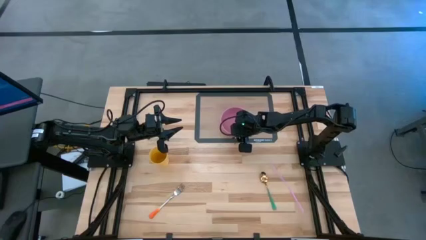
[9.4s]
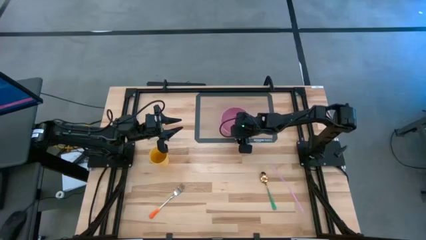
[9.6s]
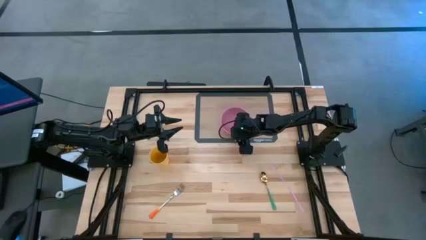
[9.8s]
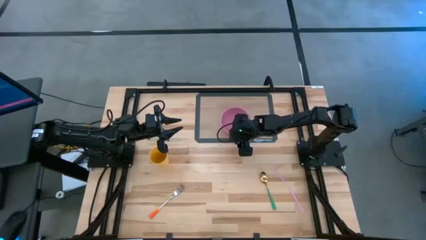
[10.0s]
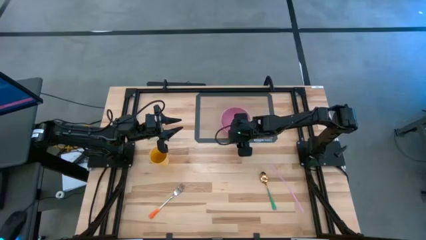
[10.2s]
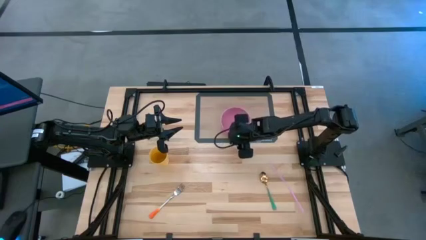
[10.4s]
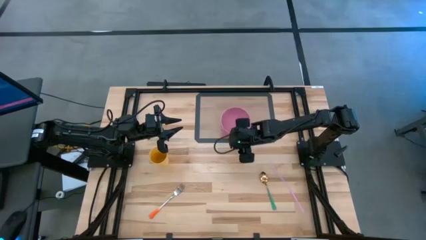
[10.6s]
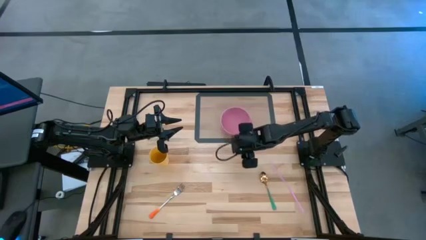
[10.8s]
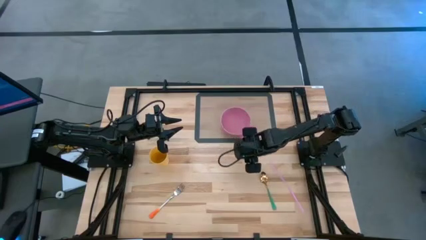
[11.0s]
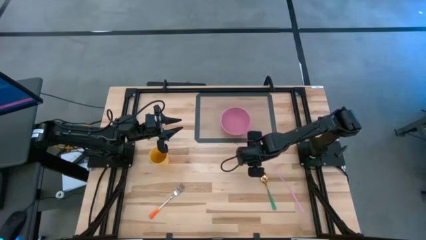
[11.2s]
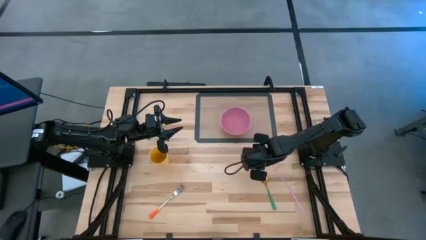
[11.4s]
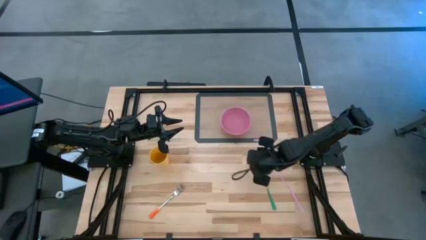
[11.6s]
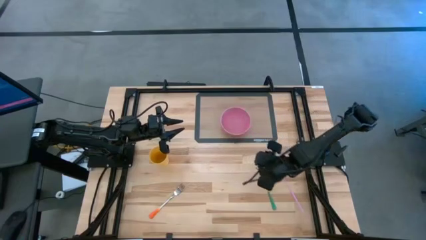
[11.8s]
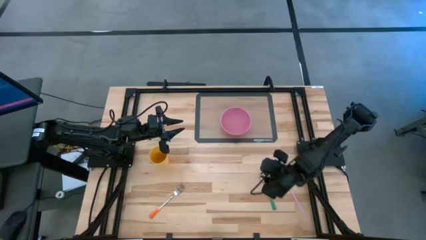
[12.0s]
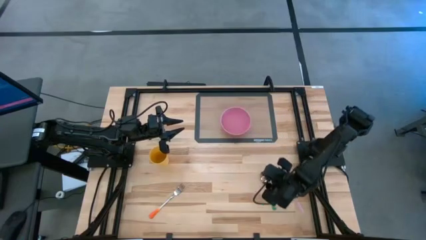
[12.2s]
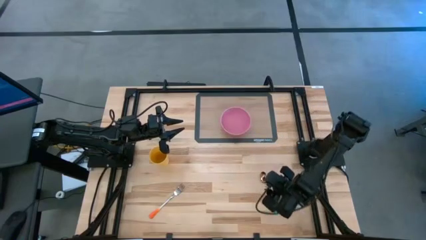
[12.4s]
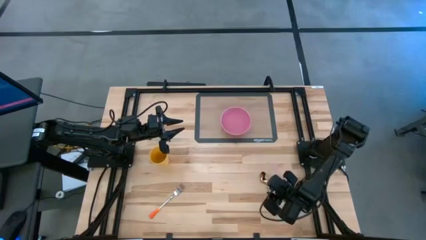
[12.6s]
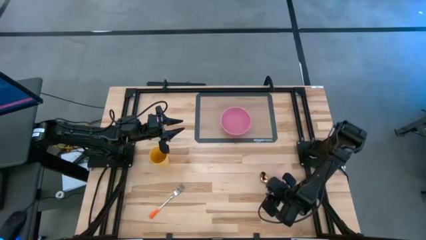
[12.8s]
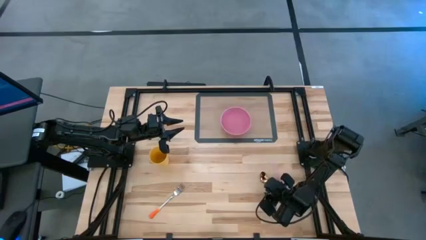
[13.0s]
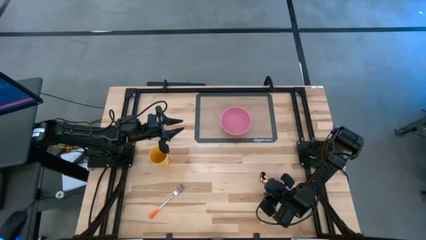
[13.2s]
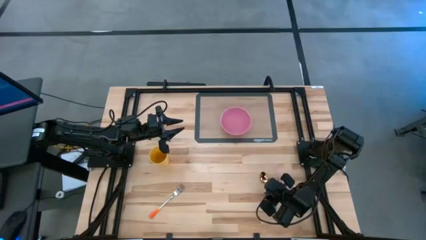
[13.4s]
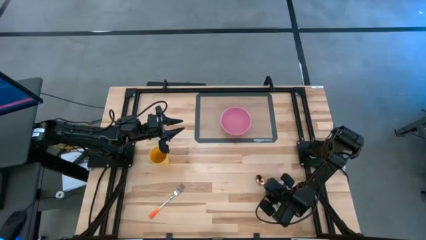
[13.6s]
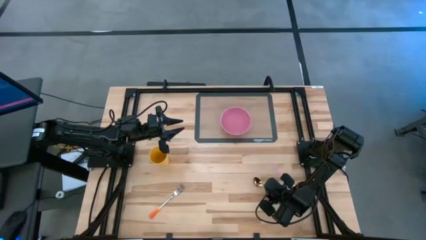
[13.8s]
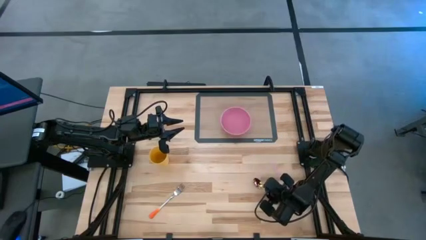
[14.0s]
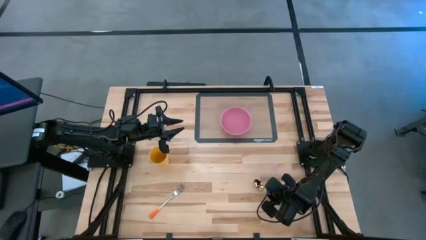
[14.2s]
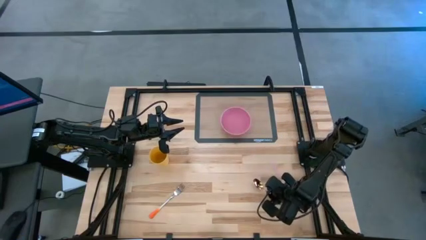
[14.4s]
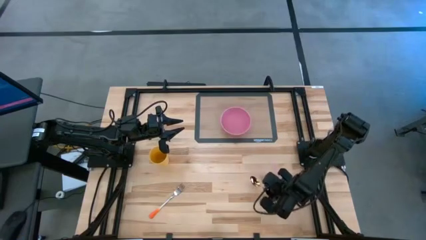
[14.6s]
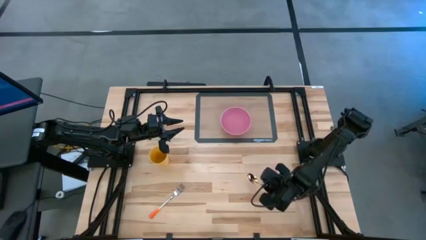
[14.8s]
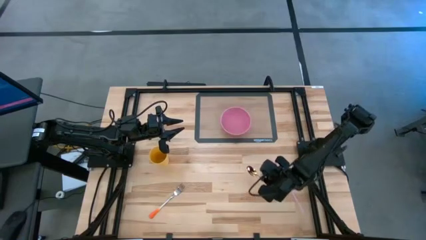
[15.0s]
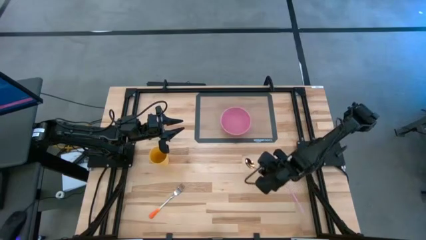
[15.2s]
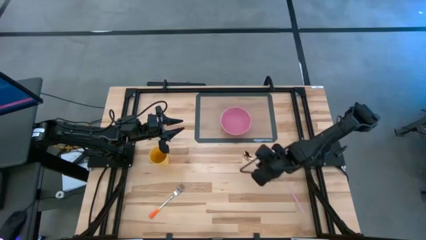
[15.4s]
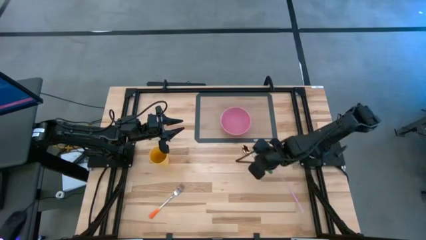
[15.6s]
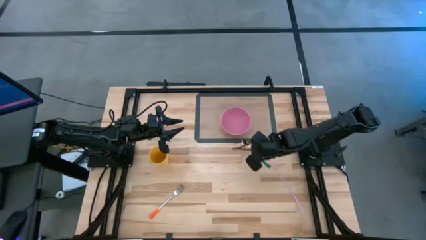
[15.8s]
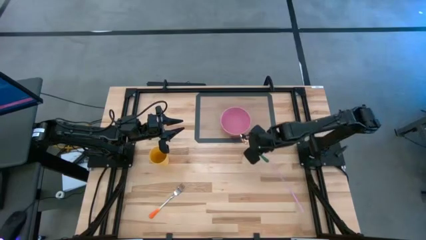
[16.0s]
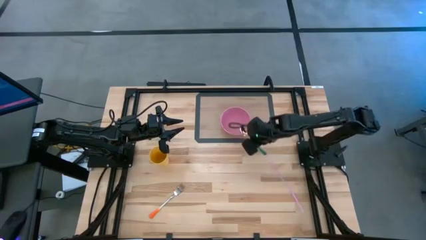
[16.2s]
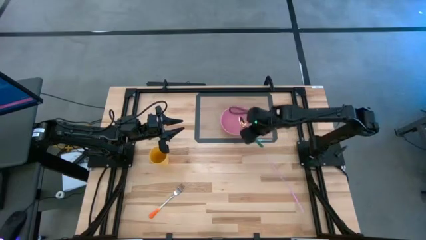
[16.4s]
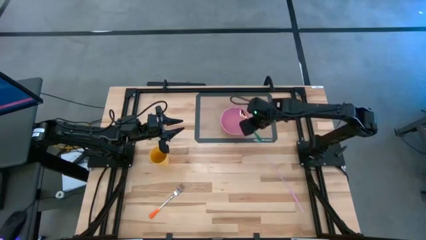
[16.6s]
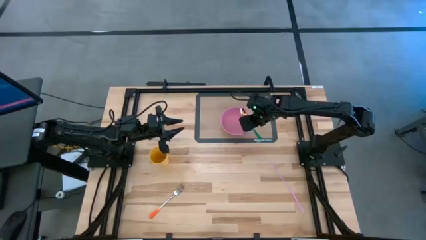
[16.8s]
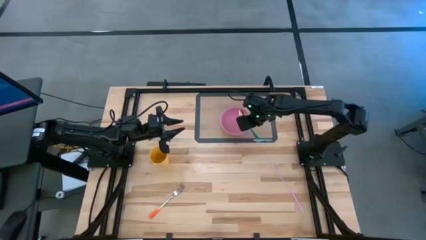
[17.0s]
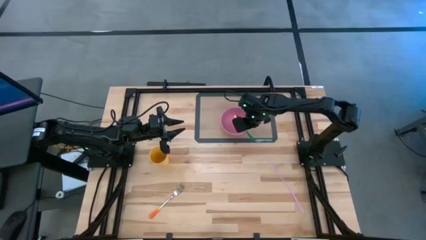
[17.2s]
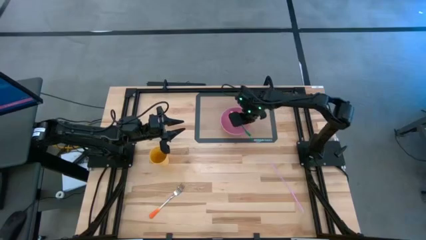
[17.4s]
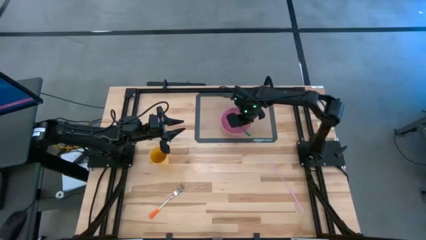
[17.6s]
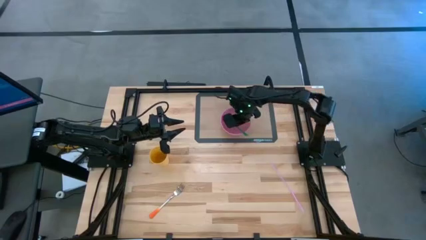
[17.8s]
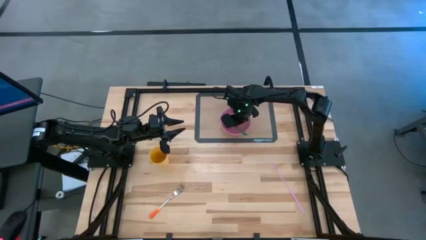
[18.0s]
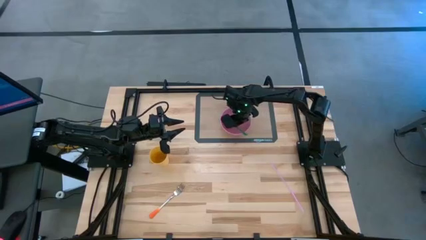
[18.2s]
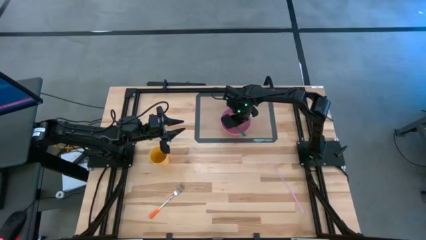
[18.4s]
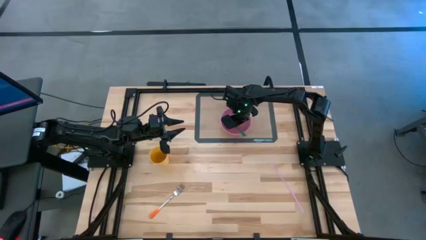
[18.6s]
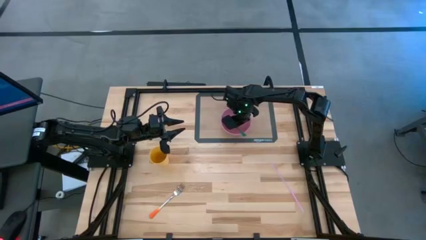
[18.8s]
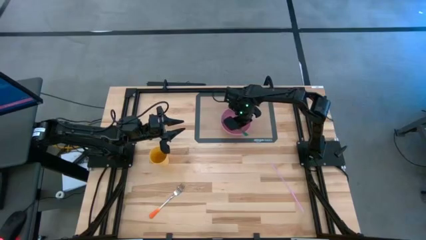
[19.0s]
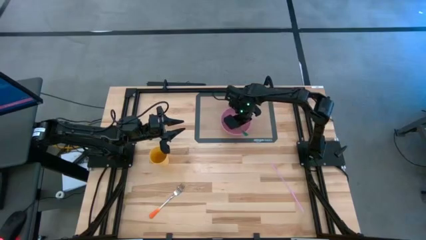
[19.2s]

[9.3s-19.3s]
Task: Pick & Place Utensil
Put the green spoon into the pink bowl

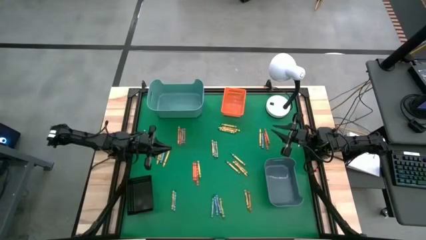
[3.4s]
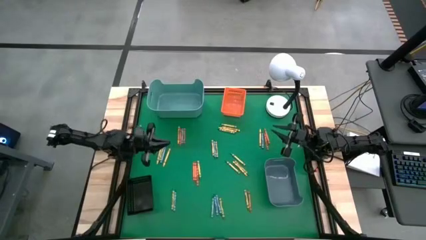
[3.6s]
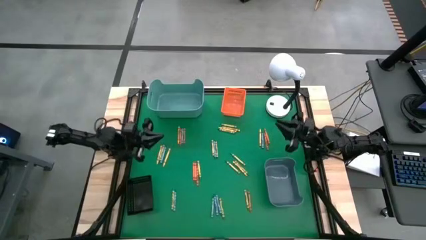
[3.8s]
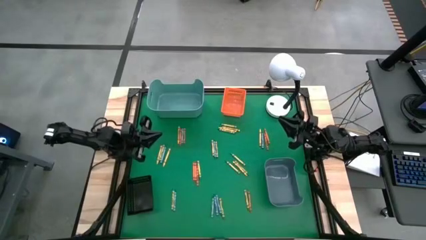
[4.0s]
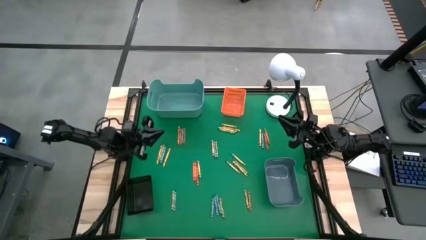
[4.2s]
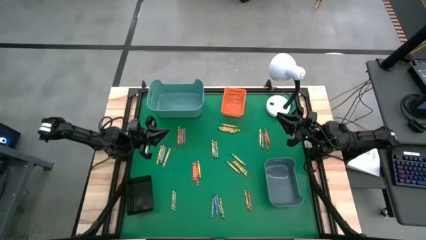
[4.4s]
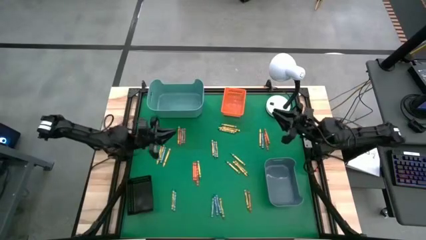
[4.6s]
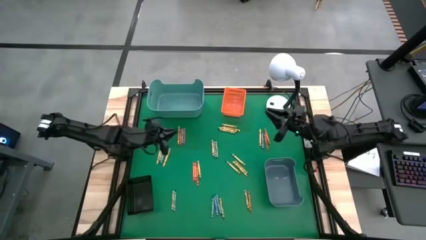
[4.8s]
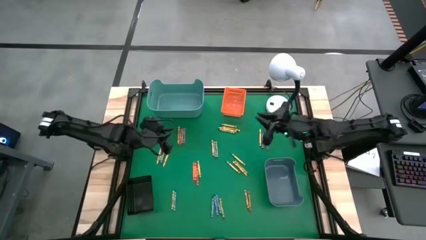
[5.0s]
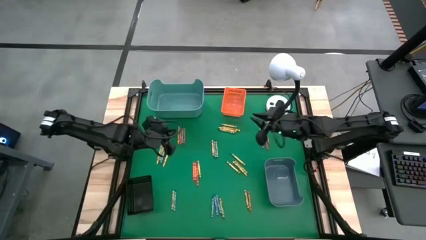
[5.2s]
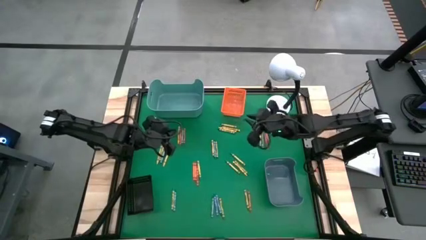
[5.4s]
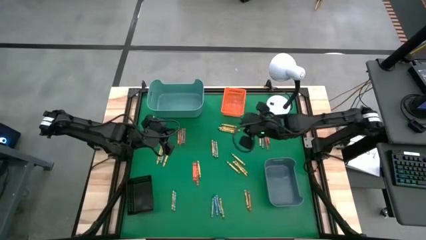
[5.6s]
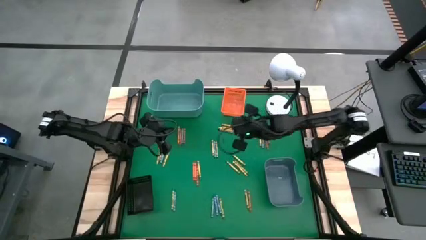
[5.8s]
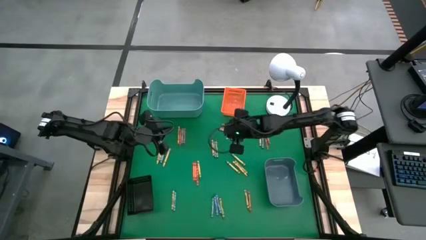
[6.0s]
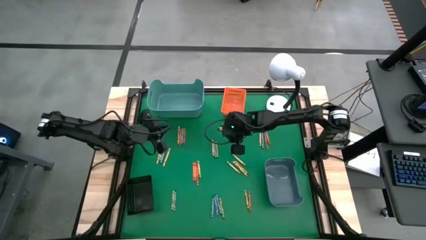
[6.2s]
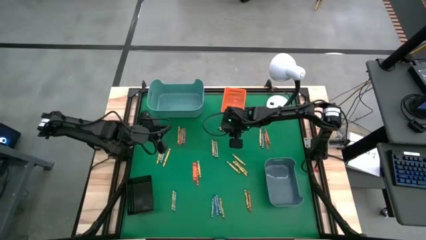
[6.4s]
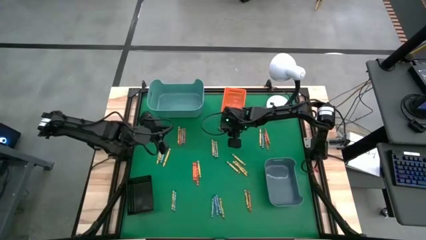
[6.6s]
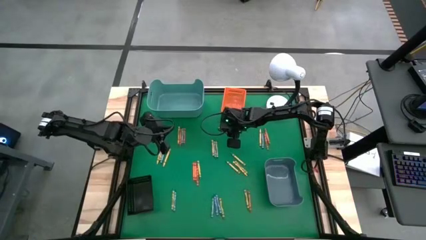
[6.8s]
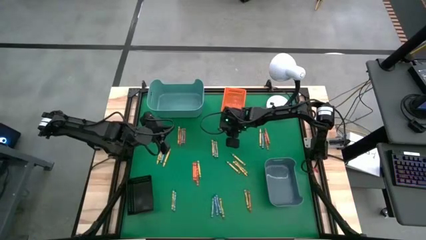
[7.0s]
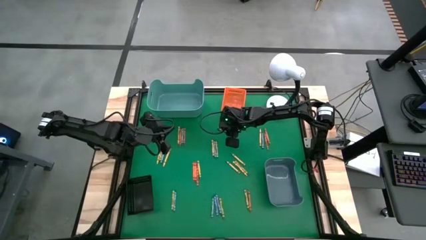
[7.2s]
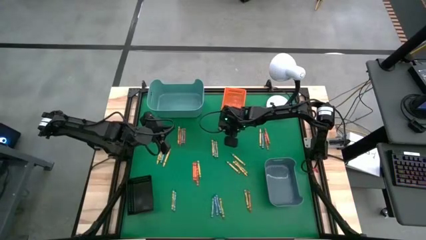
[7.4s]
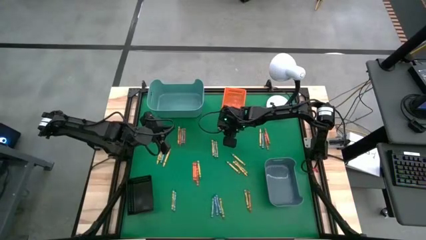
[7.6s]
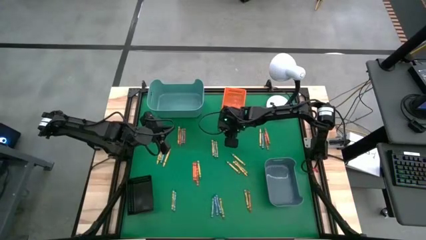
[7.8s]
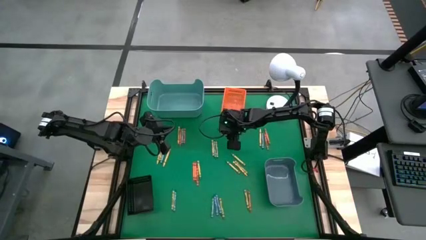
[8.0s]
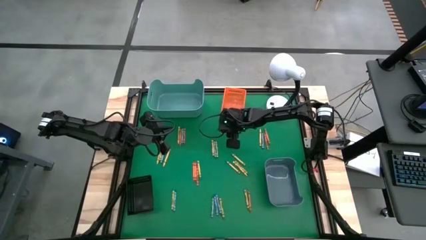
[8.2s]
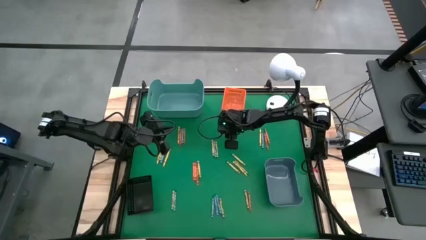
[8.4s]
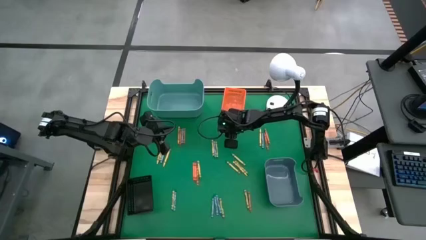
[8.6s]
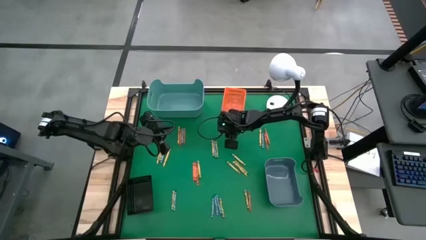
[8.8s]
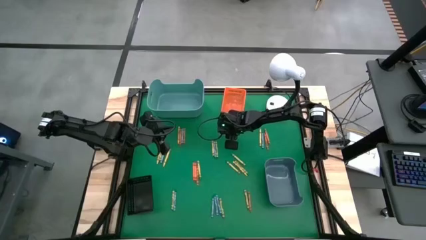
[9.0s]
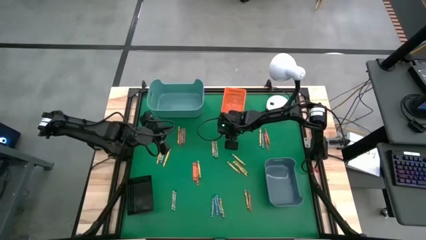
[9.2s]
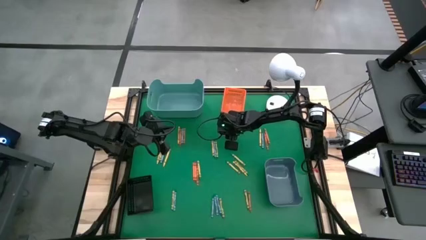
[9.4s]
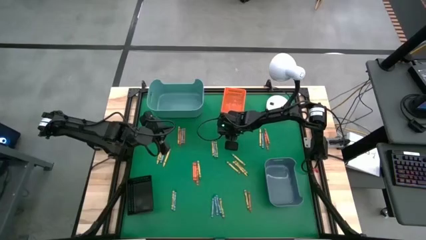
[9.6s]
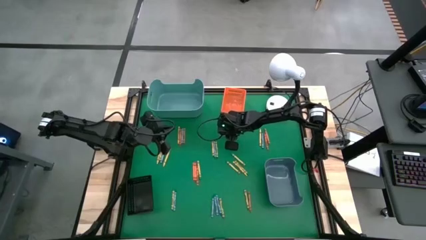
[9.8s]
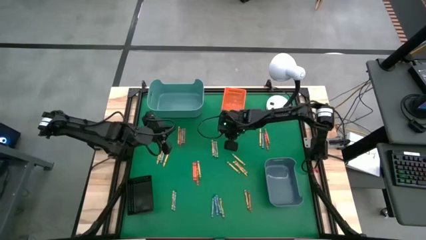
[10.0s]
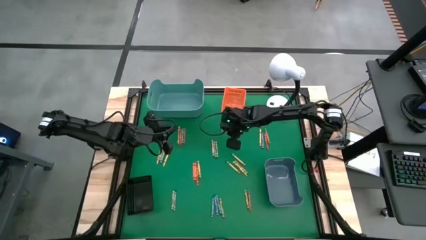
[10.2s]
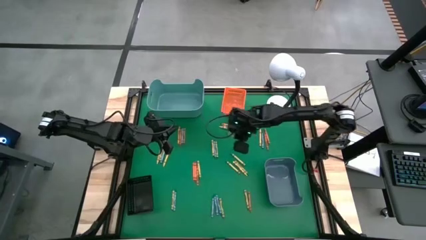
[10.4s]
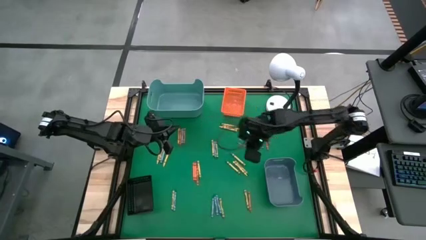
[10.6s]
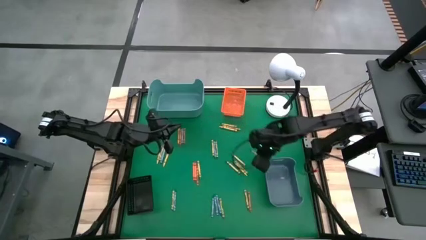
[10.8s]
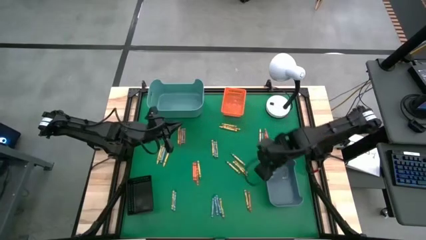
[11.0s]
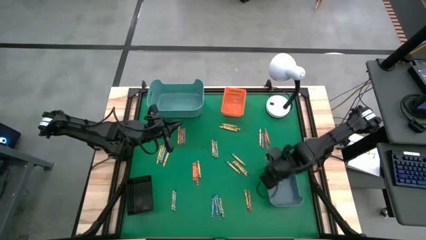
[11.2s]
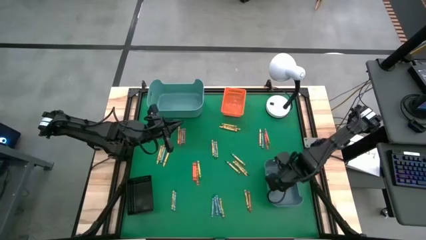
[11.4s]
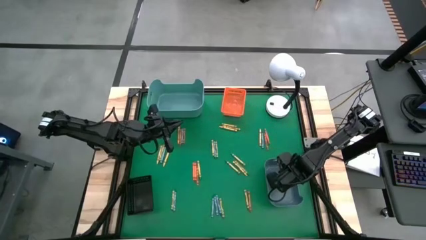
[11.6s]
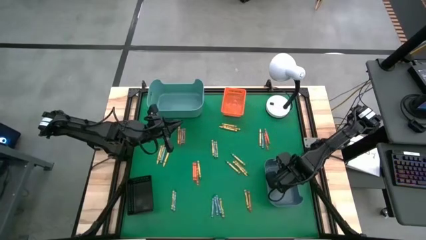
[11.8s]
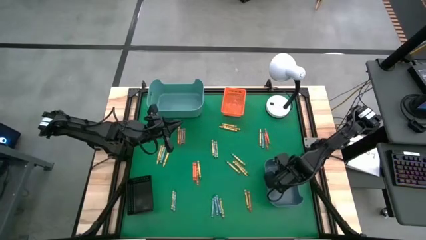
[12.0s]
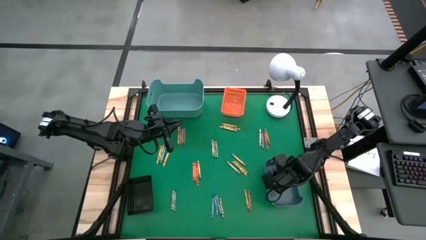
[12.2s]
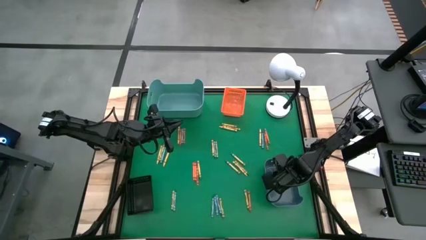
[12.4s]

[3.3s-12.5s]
Task: Sort crayons
Put the green crayon into the blue bin
